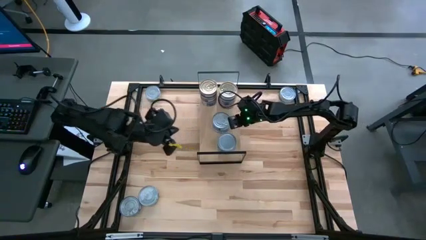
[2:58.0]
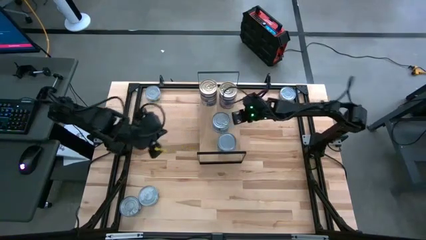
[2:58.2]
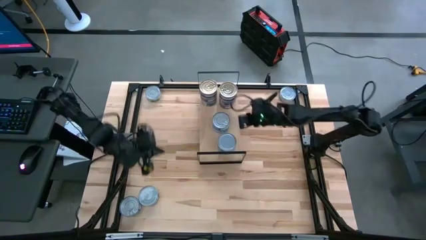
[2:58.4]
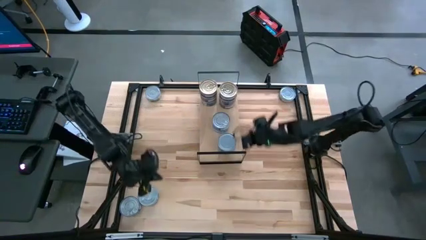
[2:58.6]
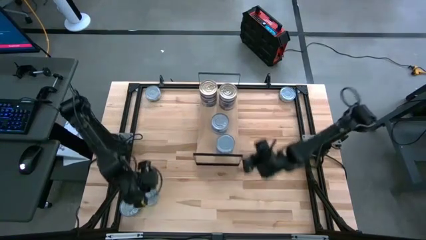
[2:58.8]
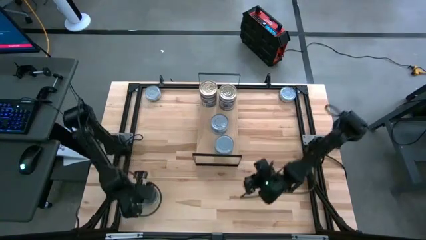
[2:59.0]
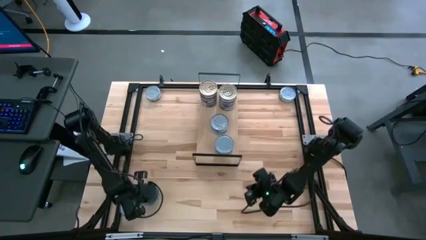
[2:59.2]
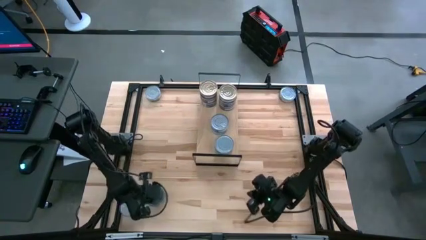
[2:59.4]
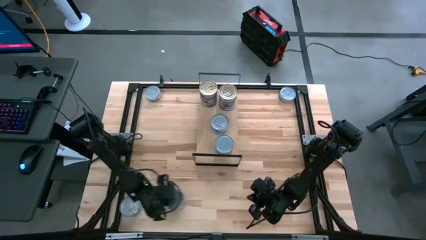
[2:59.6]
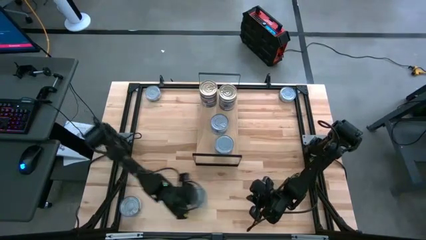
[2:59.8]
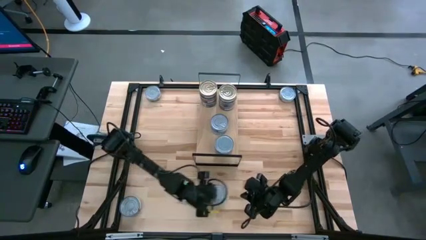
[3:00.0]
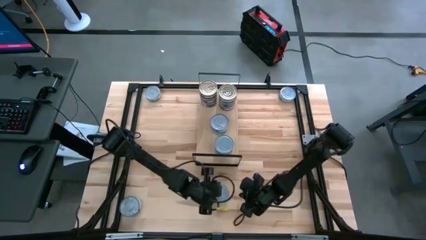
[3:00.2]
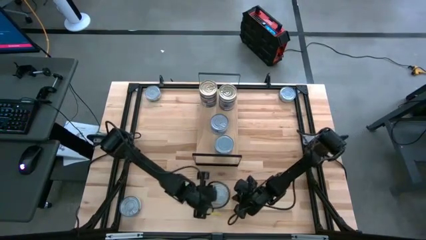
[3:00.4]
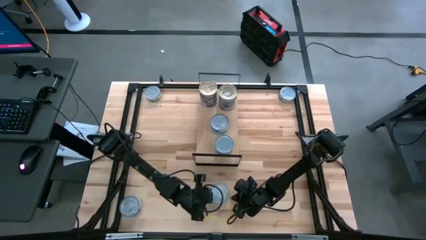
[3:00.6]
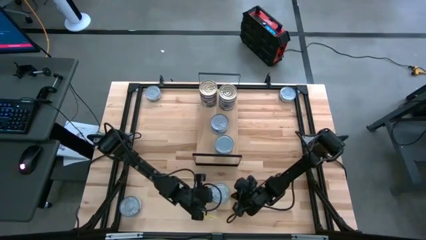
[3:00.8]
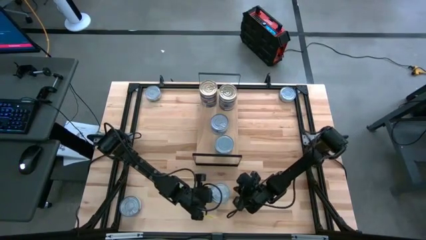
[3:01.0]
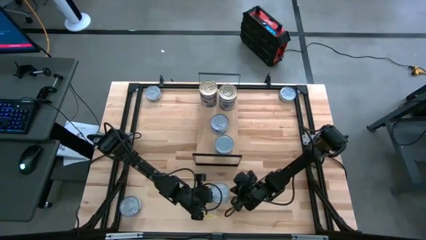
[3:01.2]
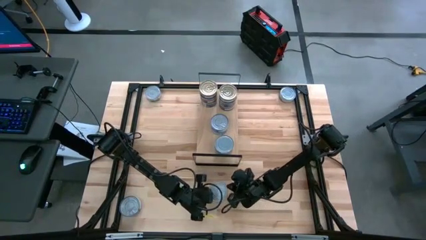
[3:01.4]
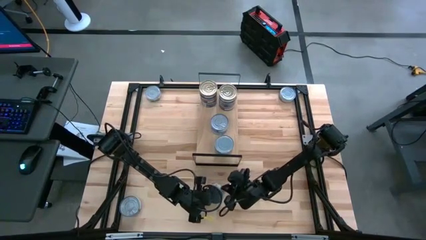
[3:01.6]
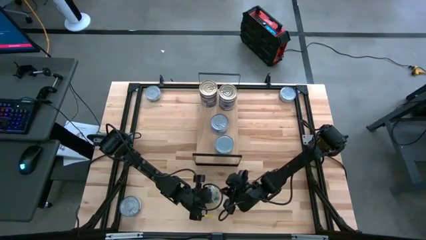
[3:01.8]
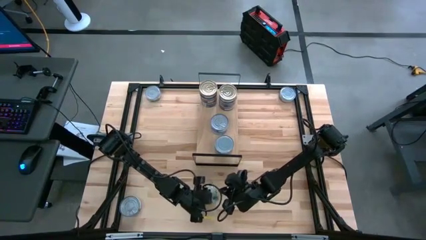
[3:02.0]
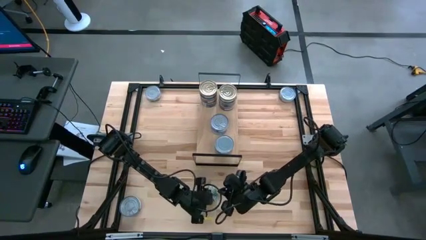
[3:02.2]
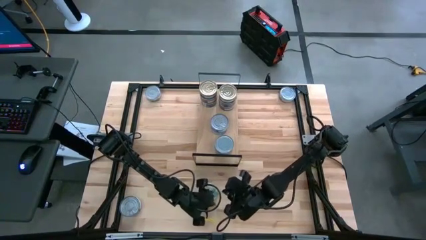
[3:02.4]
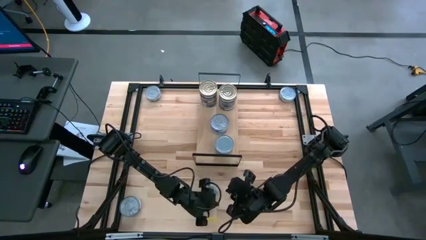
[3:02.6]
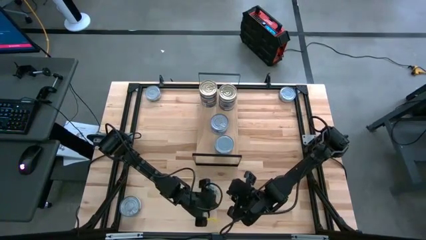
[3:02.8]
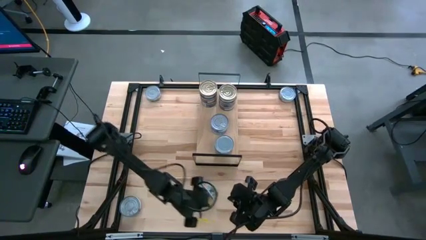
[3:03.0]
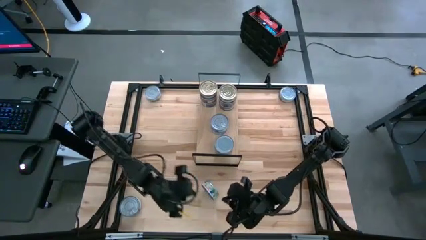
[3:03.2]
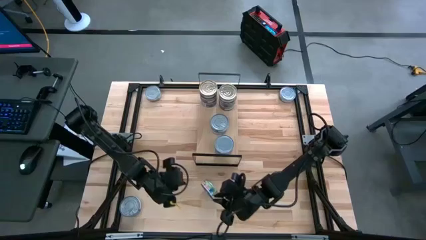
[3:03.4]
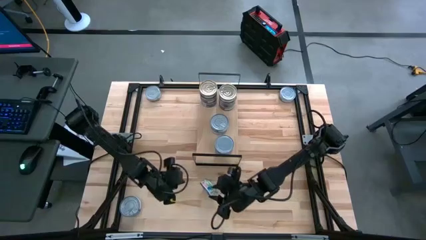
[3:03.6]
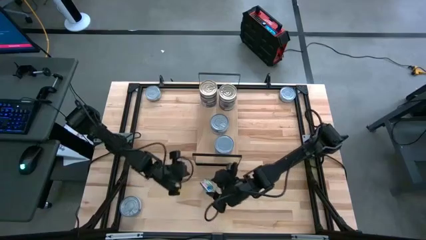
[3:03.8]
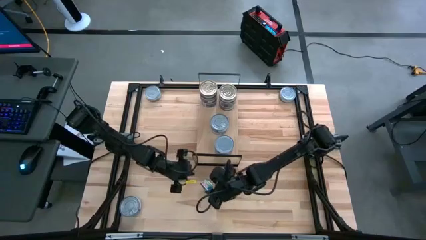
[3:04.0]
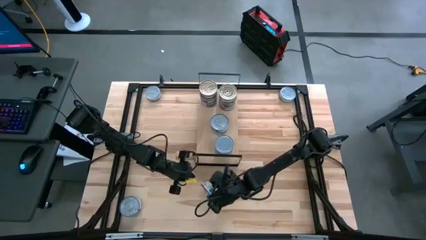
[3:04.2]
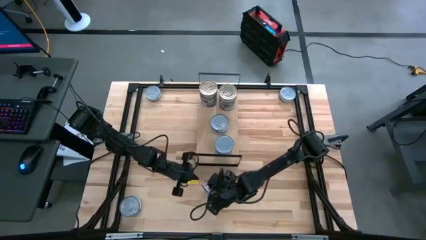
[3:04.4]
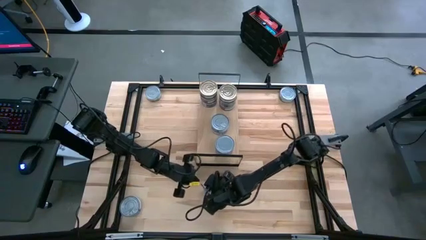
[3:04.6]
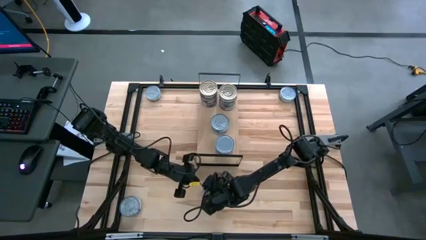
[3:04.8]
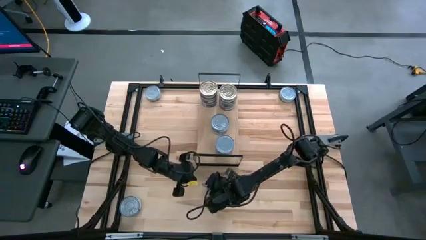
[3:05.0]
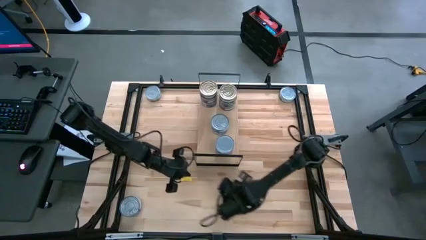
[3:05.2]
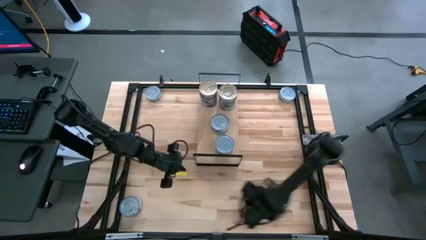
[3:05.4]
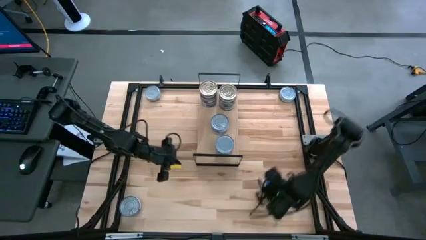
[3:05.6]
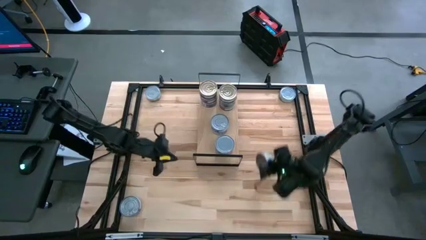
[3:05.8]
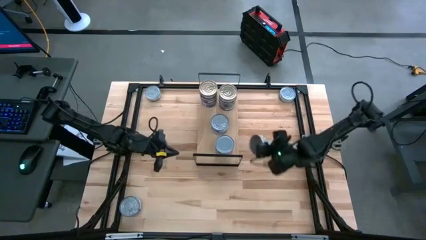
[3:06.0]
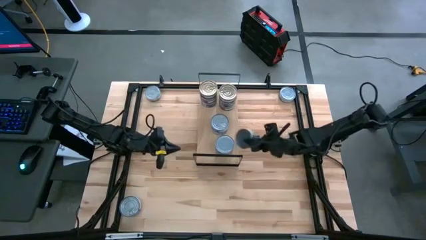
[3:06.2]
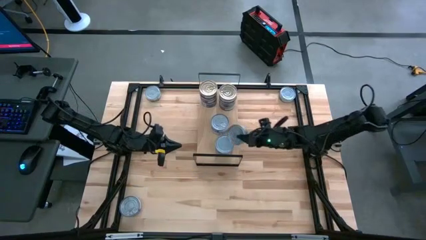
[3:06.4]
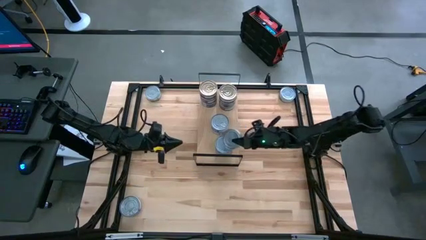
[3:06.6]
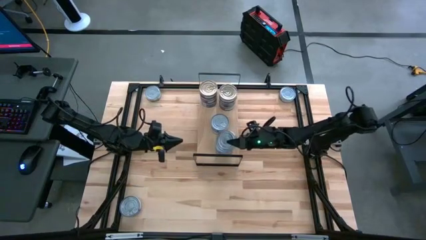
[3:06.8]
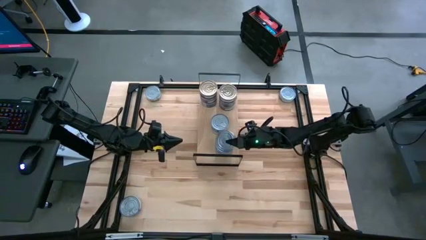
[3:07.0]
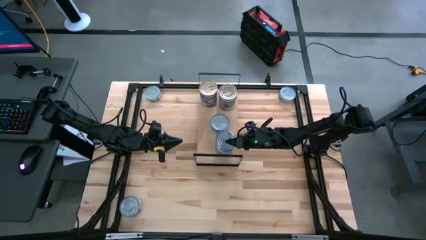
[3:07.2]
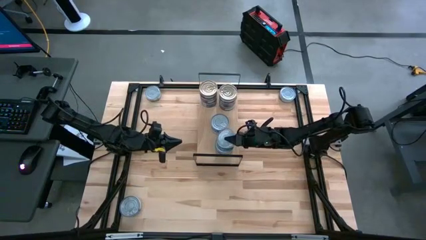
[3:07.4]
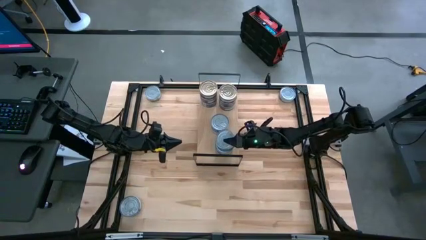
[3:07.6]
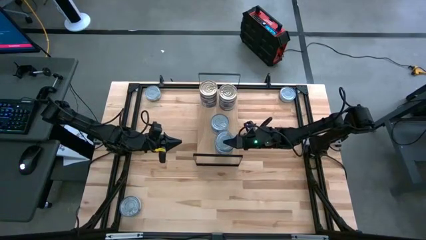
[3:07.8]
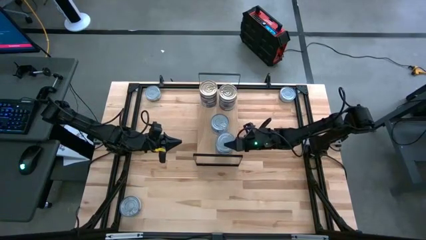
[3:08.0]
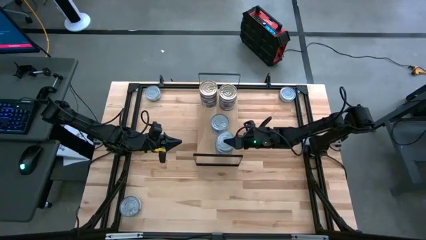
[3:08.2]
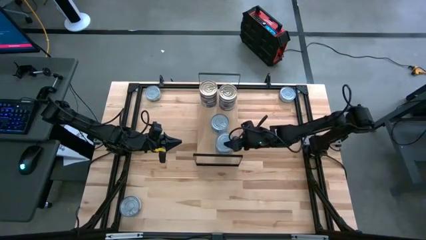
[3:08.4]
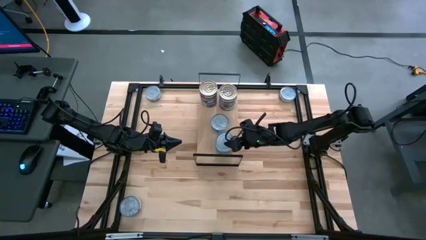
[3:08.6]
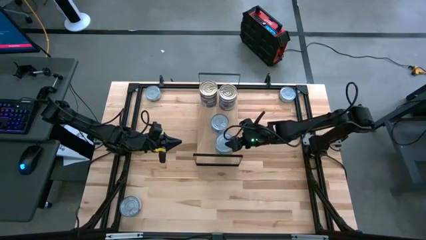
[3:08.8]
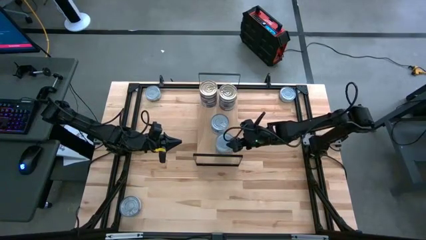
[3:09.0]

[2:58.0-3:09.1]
Task: Stack canned seafood by type on shelf
Stack the green tuna can on top of the other green tuna cans on the shelf

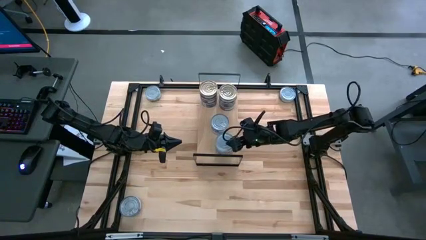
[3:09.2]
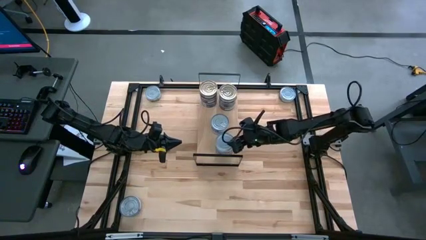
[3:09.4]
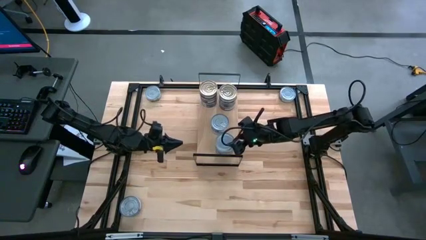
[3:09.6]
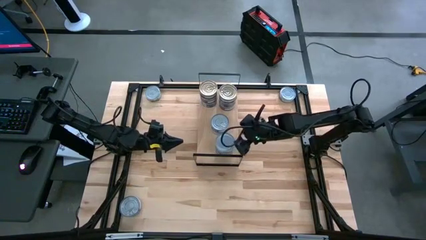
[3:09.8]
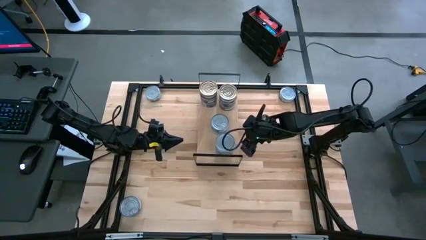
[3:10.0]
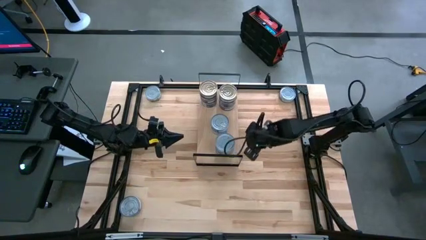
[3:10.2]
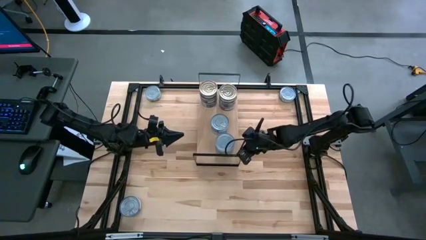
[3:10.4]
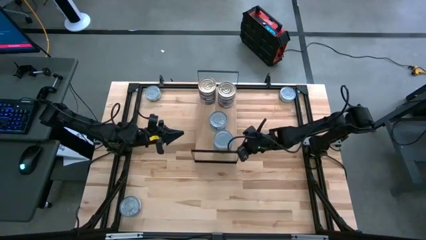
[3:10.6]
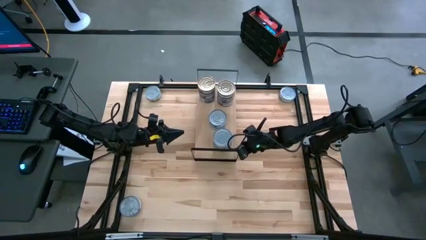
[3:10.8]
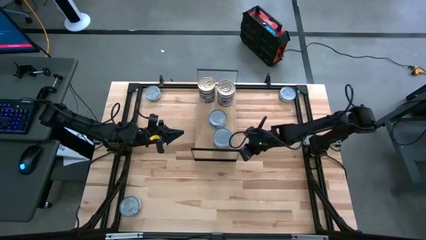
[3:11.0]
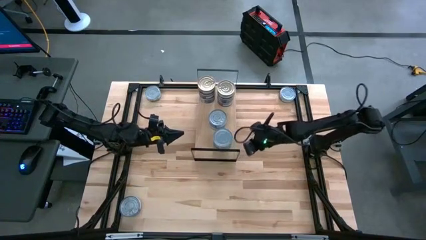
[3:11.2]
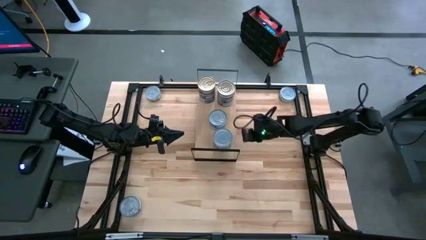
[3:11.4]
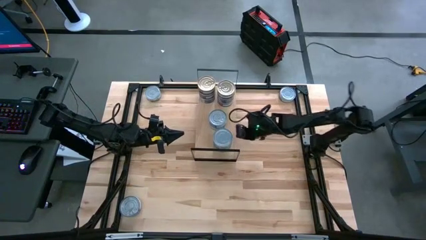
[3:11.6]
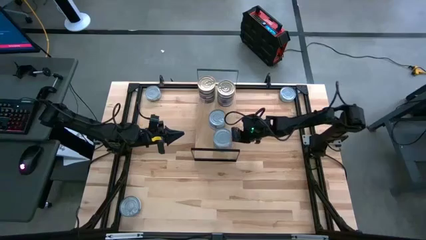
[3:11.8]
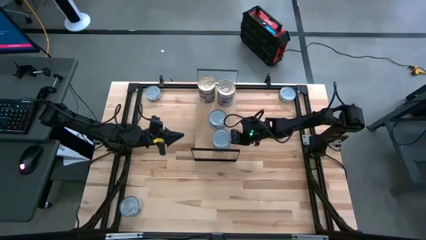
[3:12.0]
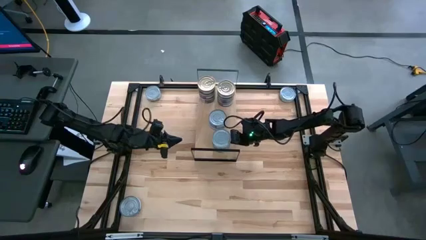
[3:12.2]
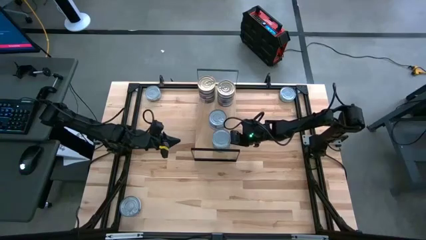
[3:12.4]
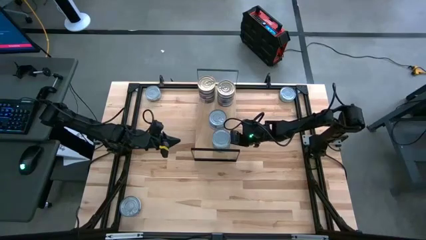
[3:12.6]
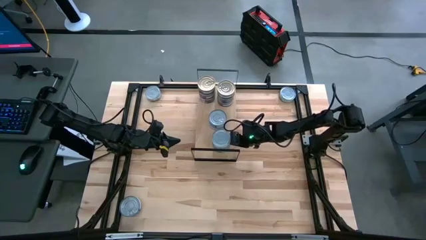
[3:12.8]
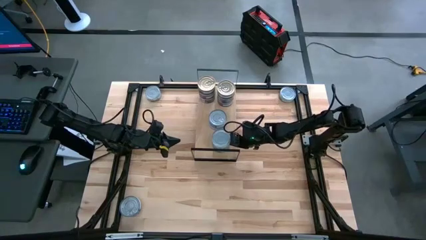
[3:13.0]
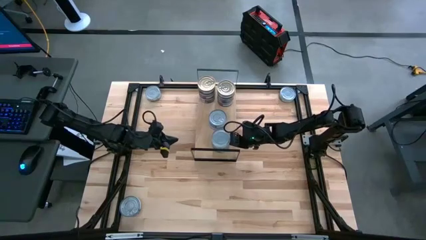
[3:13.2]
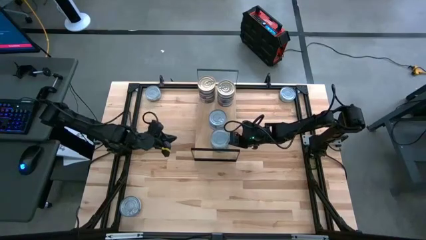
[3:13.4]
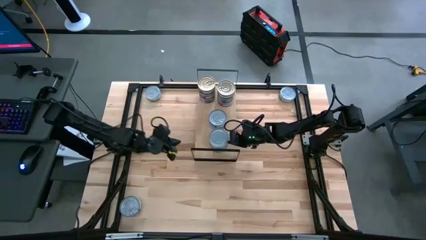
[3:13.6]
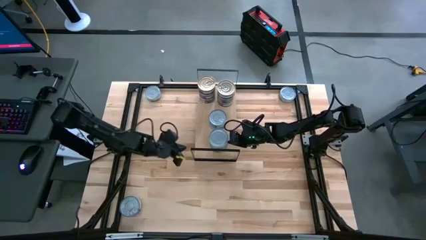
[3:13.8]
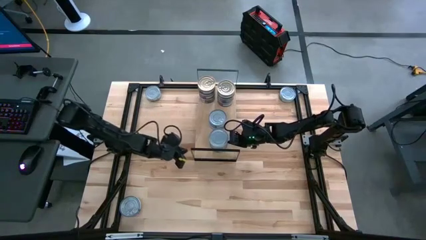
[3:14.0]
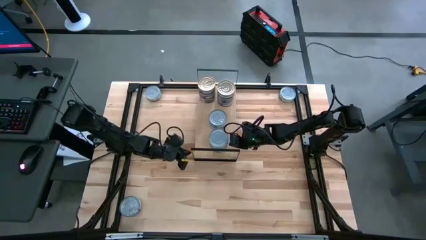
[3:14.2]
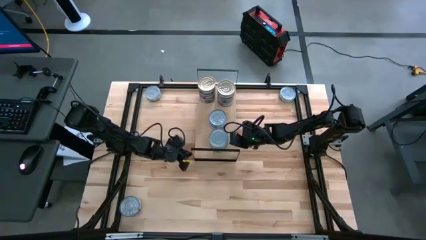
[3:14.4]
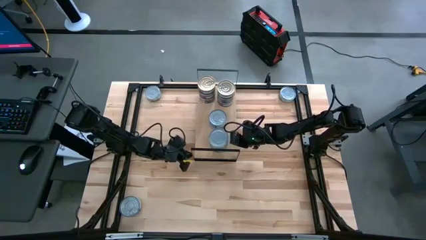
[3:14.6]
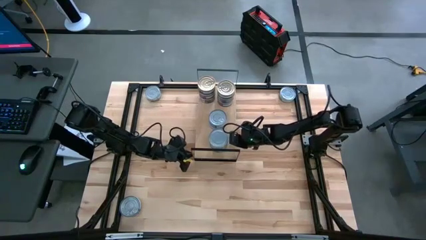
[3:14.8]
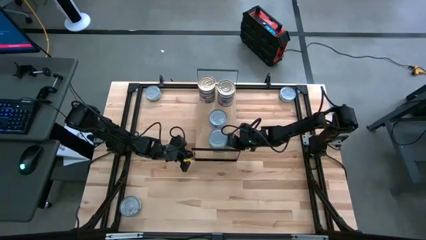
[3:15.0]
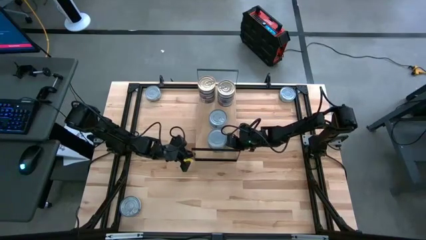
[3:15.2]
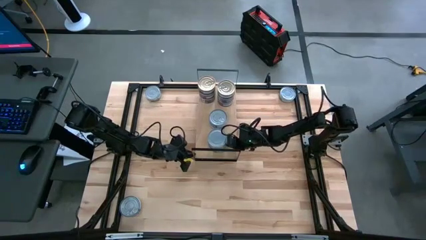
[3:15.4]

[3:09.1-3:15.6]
Adjust the green tuna cans on the shelf
